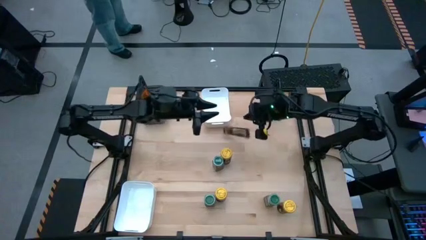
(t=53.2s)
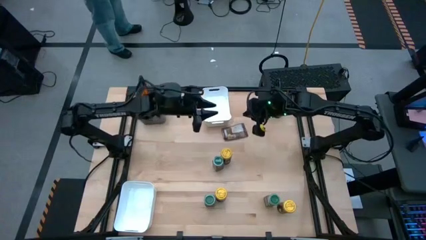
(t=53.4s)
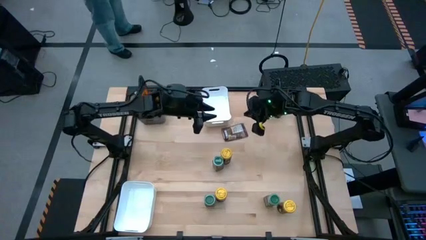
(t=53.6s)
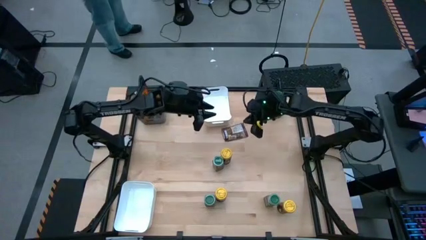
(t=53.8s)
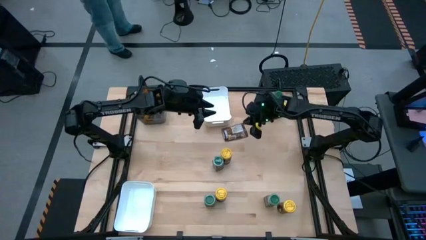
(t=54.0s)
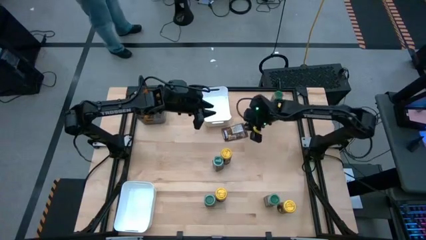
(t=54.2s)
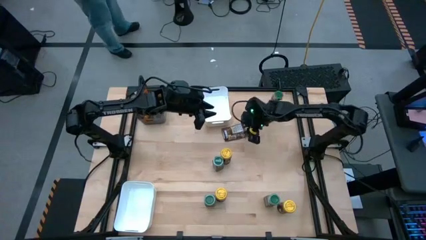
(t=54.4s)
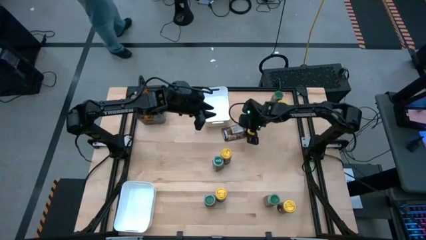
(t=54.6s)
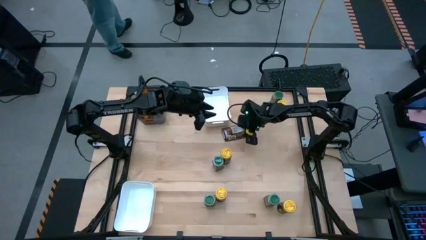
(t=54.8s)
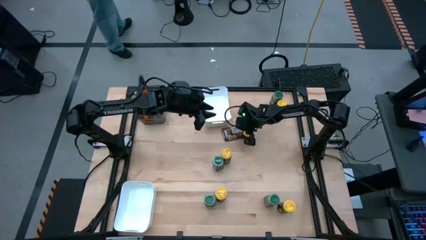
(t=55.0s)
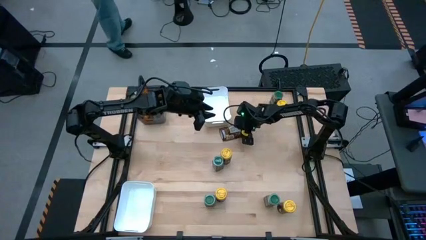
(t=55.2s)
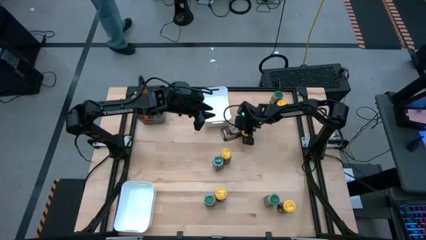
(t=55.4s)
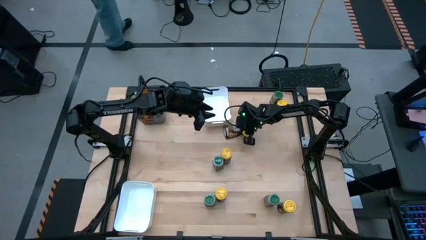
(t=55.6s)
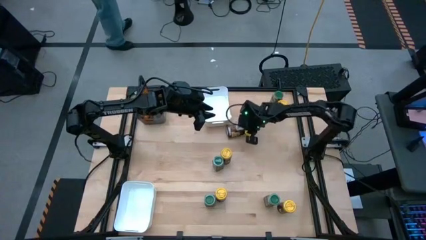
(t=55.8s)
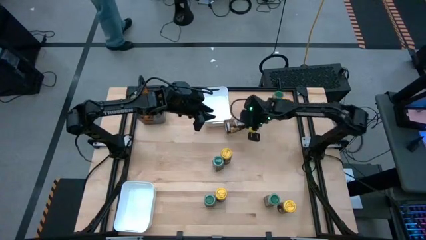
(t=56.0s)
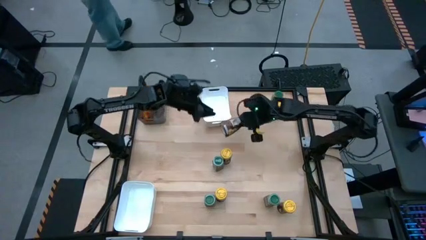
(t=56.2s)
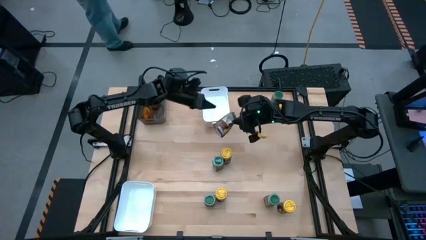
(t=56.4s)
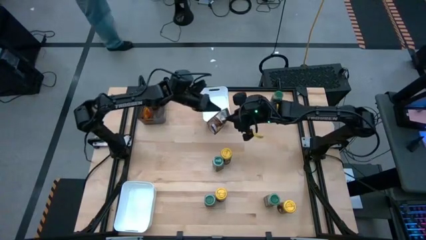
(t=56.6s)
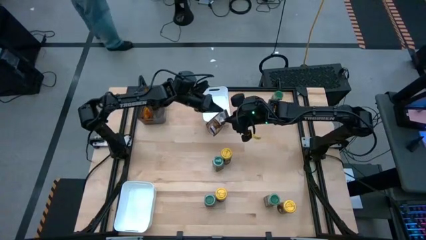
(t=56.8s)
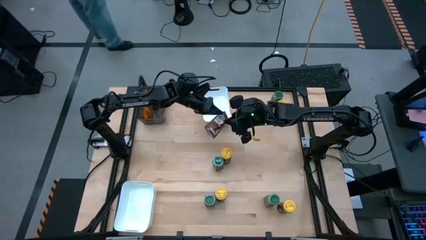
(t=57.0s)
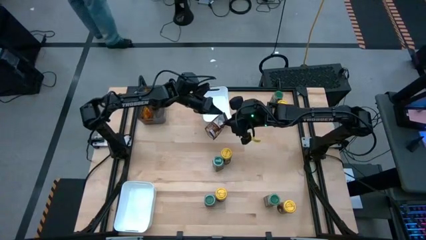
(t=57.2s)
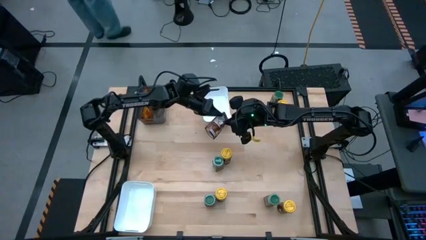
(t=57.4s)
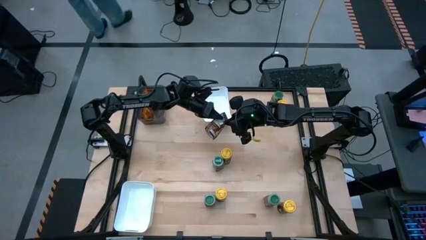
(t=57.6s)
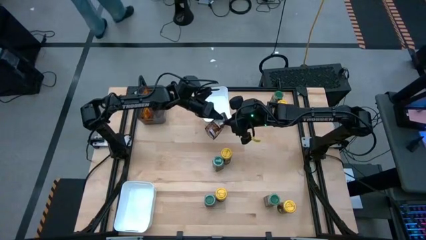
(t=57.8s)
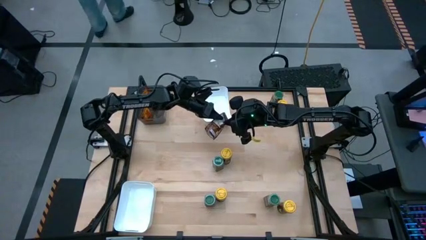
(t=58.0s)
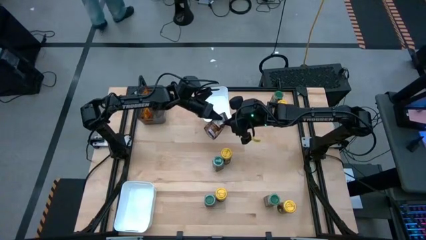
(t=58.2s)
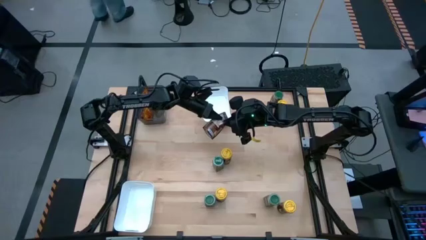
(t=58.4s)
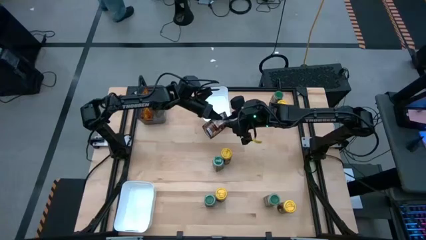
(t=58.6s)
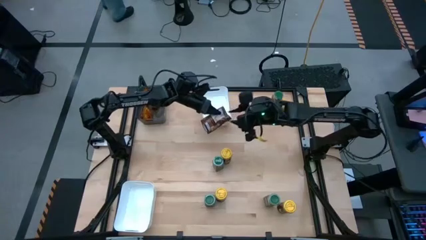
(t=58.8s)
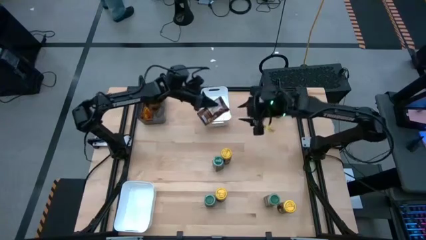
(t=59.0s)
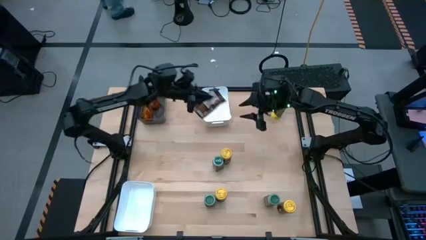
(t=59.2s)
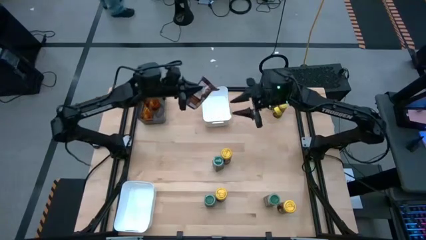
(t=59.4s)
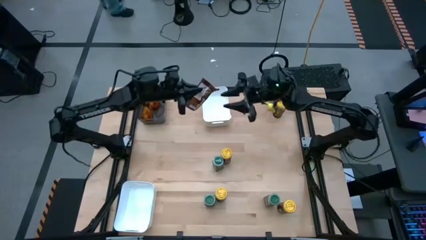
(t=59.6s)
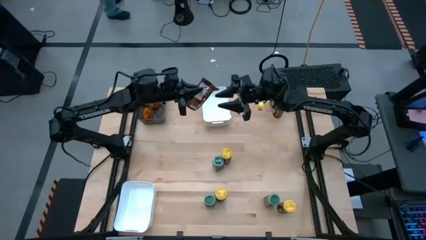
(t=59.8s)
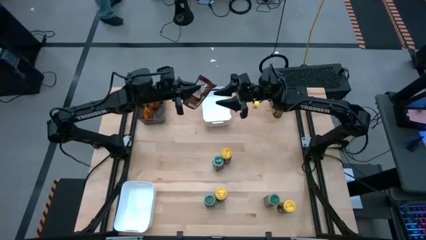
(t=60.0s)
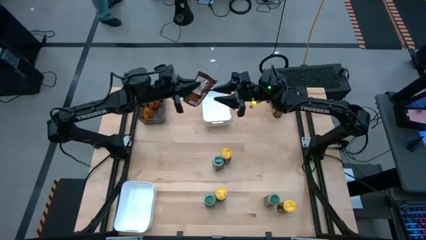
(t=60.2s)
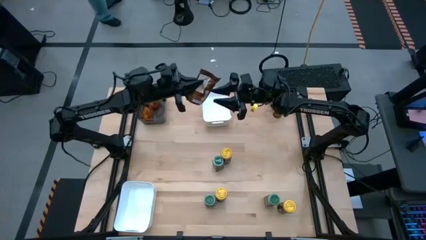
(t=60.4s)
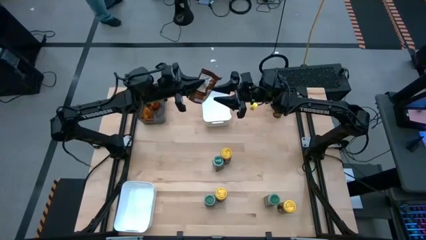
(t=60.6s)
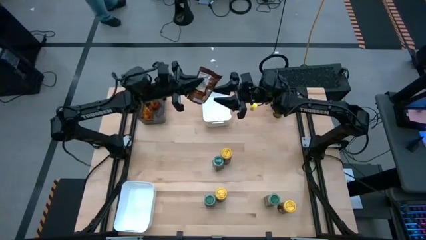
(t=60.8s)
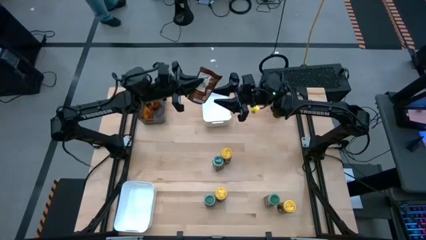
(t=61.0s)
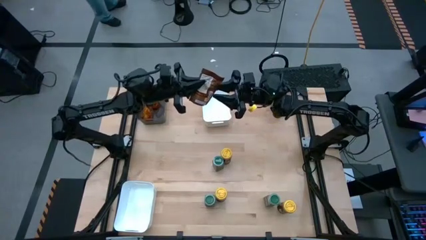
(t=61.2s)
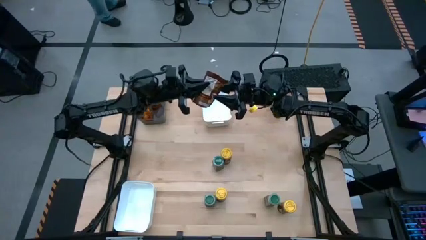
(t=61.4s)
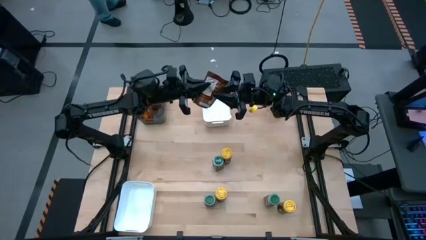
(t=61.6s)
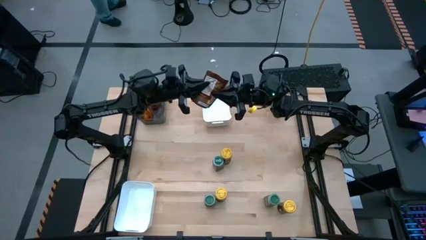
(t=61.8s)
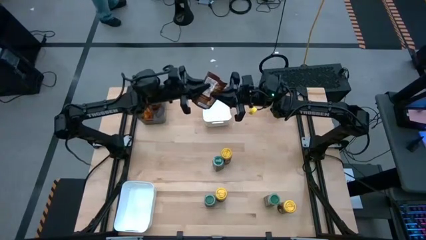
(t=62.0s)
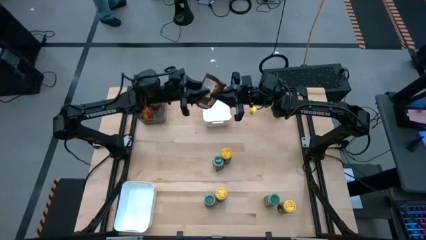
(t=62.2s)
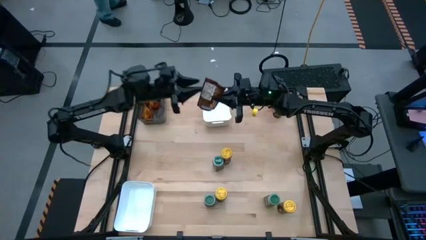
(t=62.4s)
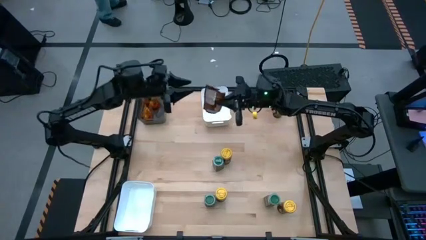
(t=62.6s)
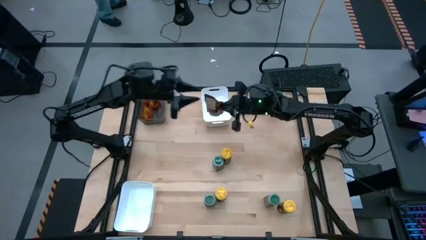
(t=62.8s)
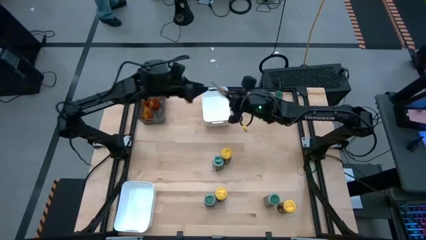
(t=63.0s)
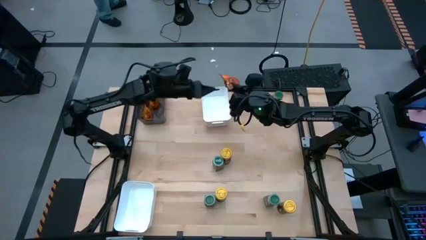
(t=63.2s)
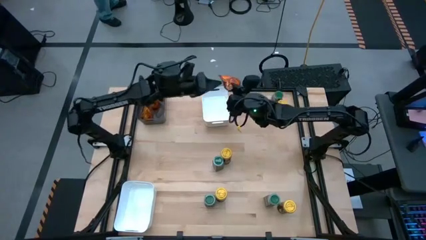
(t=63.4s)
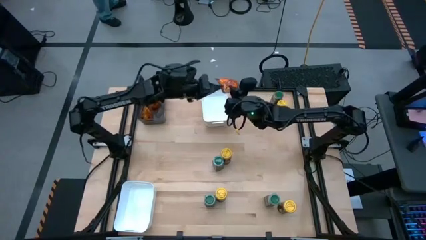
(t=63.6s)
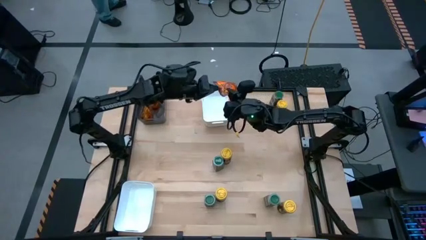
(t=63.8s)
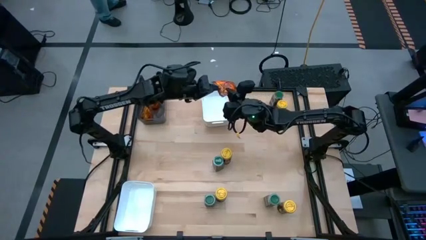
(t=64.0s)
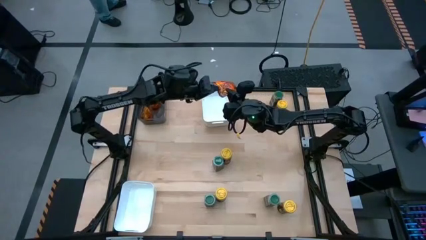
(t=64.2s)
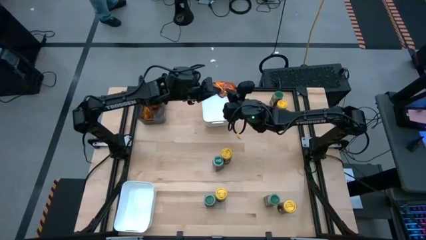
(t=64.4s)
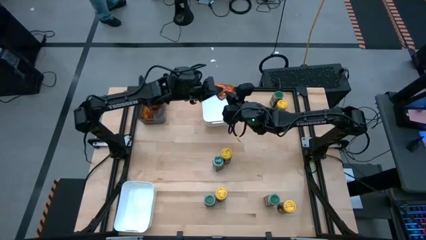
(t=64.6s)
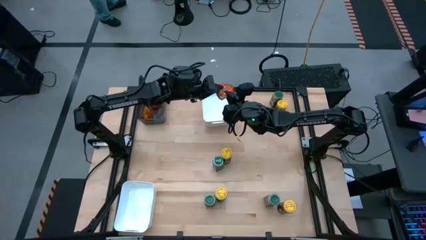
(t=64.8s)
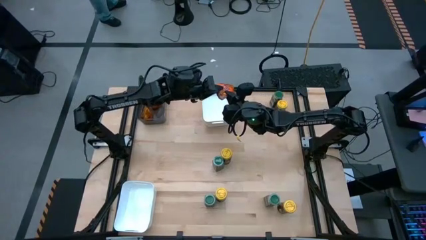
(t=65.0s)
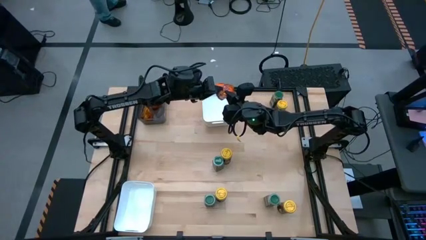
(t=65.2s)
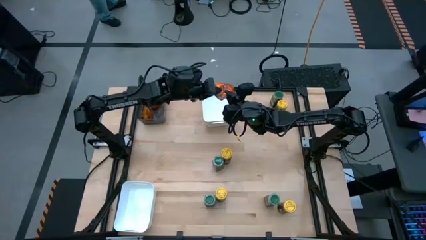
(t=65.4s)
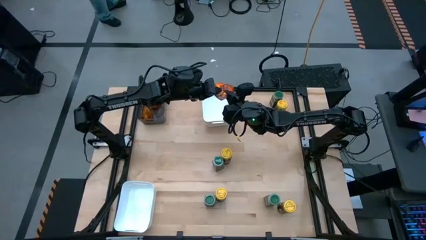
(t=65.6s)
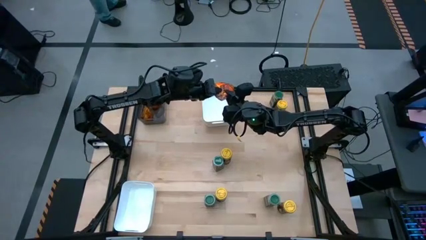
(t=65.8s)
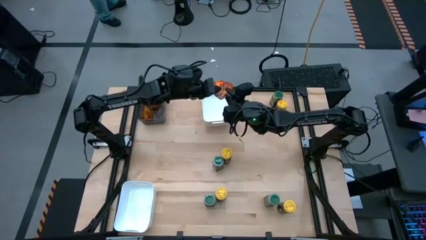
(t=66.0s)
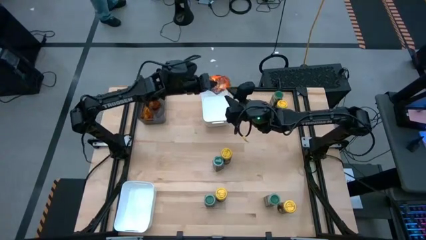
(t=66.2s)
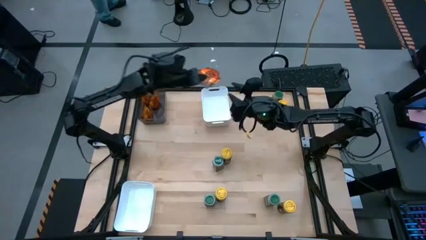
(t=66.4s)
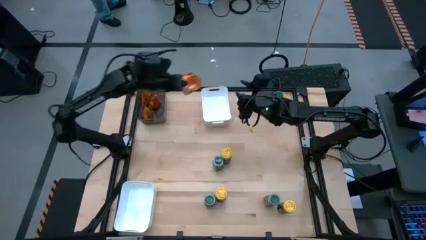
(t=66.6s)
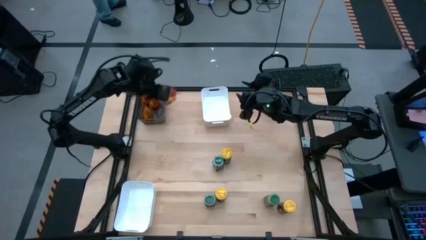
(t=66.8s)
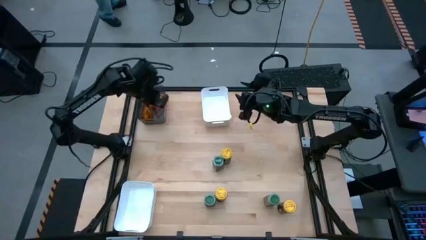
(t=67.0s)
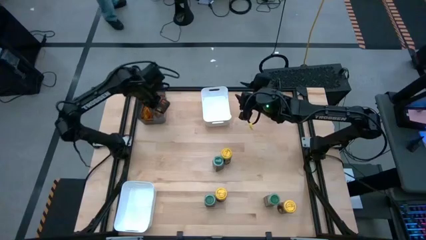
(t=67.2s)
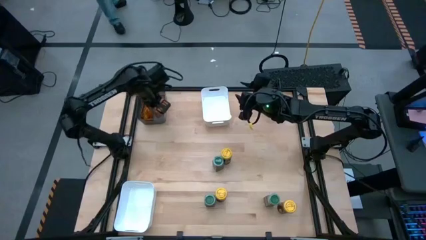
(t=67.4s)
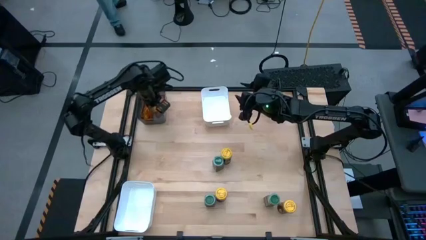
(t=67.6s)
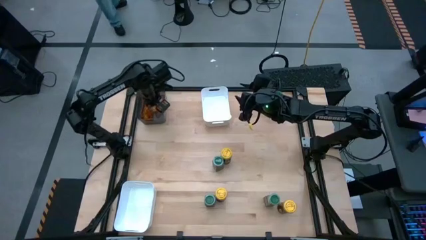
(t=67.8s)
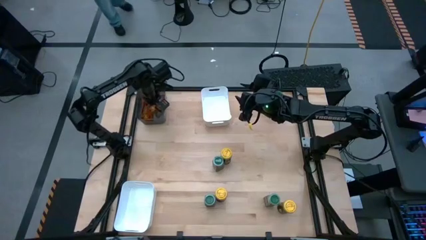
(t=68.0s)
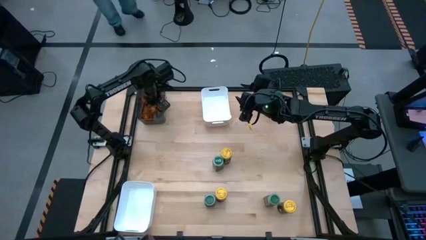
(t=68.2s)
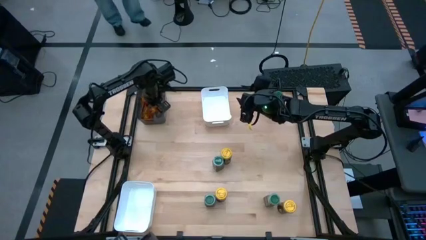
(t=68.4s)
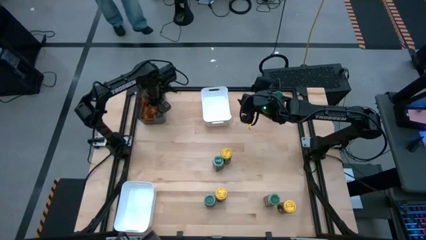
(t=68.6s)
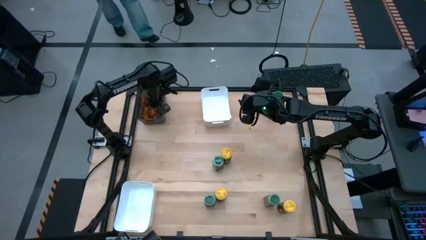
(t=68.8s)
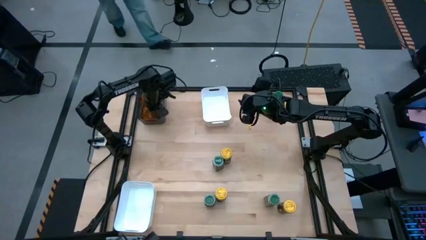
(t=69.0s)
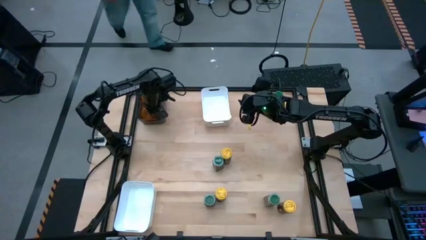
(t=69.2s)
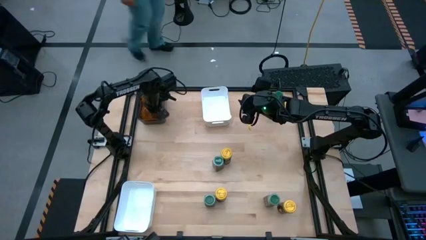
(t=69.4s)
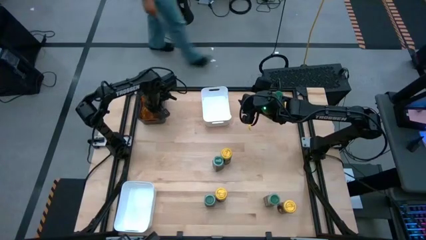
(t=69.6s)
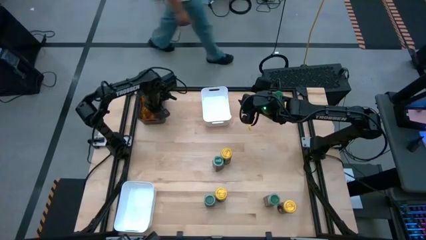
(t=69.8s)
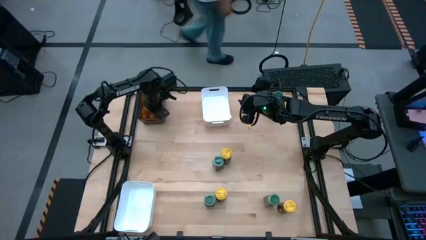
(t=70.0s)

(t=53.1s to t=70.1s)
Task: Sort spices by type
Put the orange seasoning pack into the black bin
